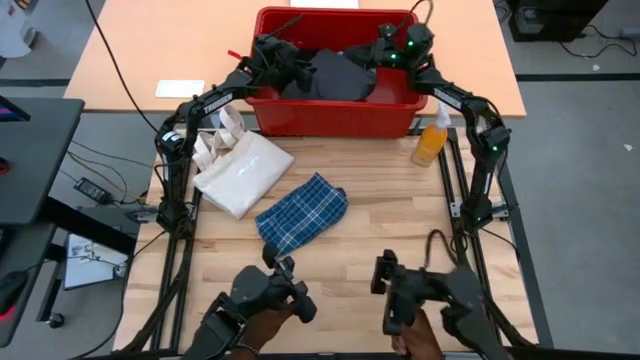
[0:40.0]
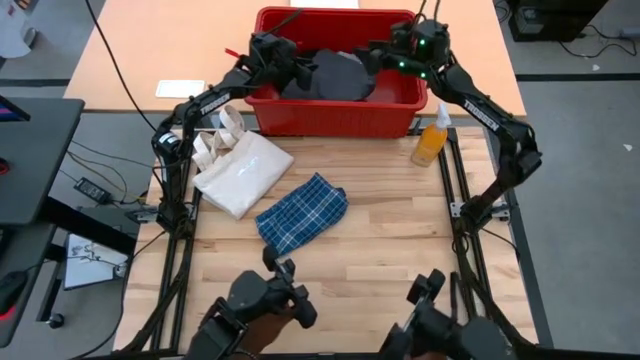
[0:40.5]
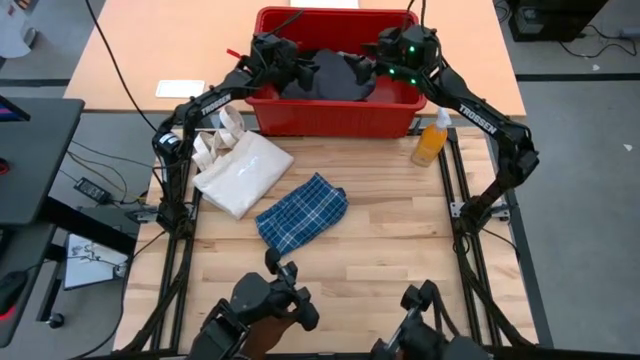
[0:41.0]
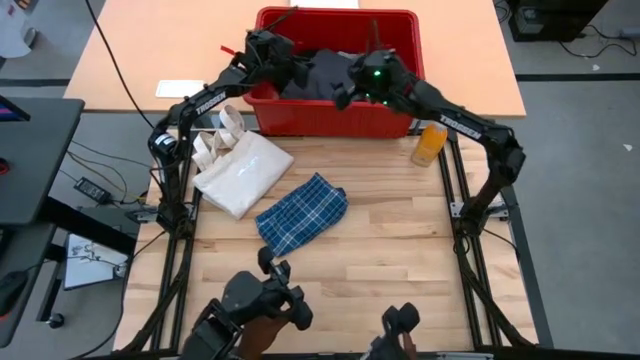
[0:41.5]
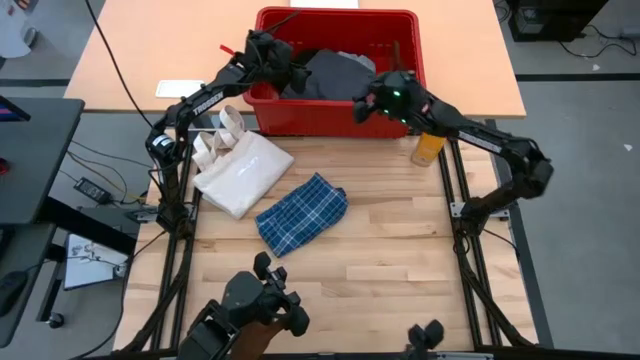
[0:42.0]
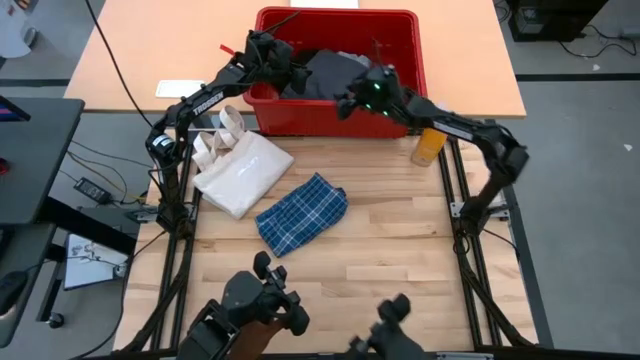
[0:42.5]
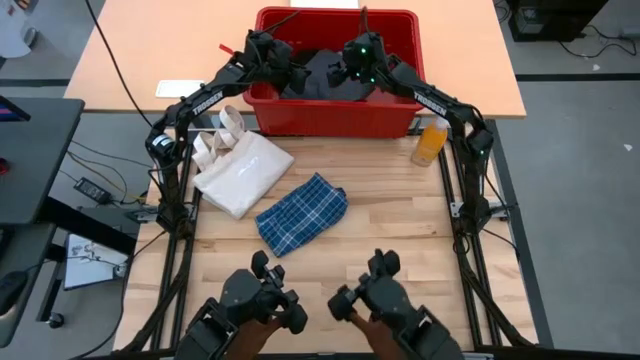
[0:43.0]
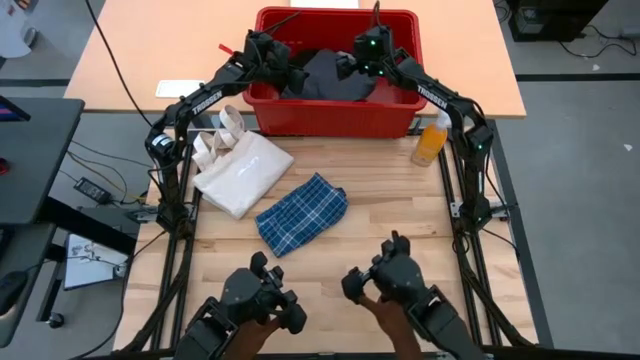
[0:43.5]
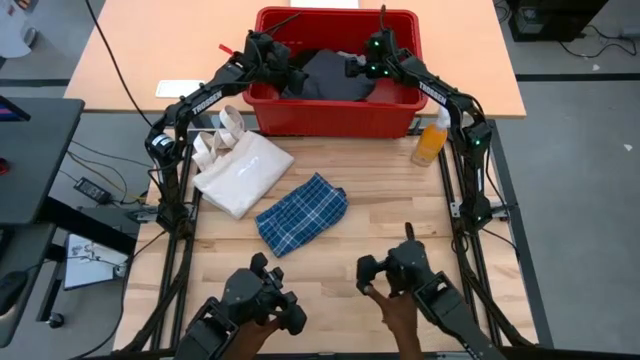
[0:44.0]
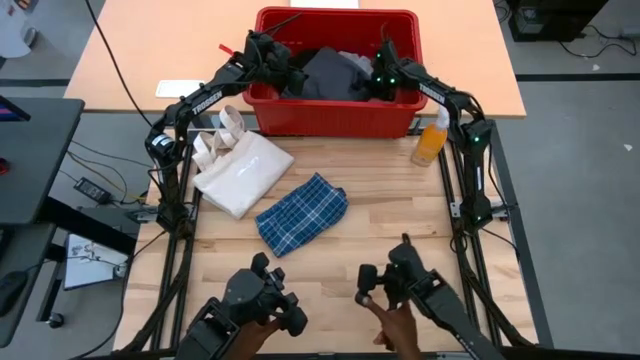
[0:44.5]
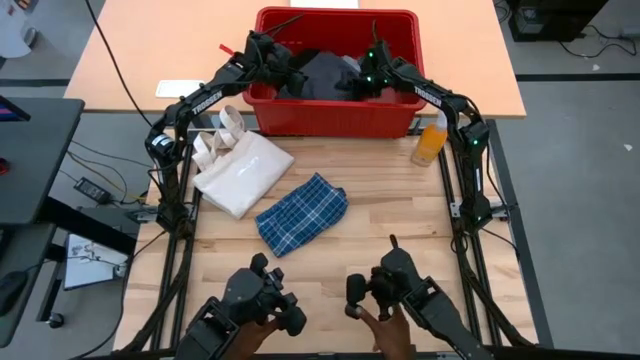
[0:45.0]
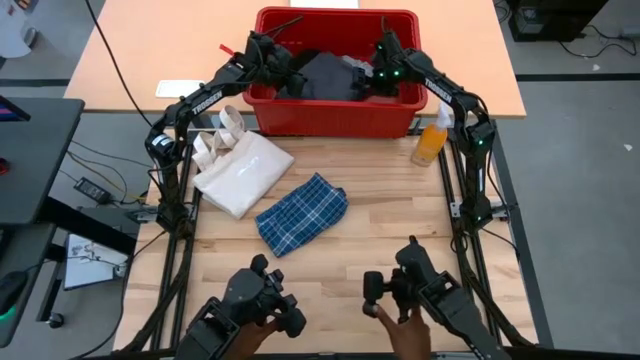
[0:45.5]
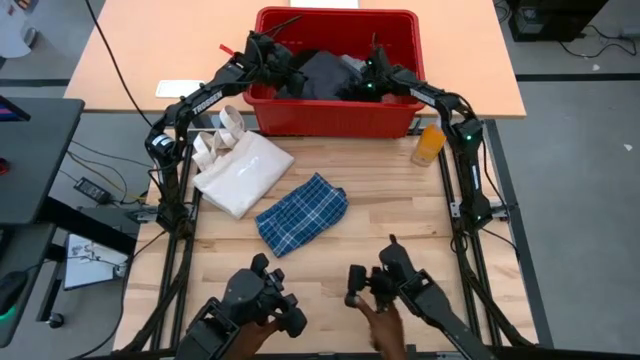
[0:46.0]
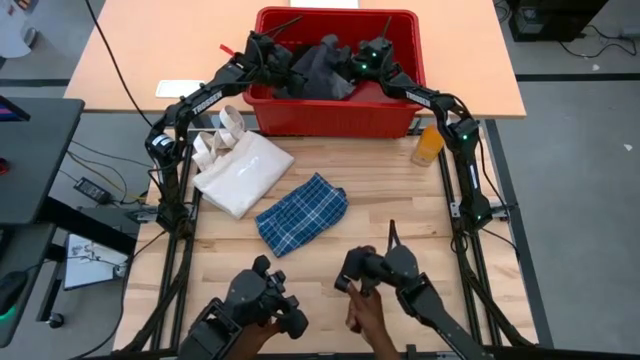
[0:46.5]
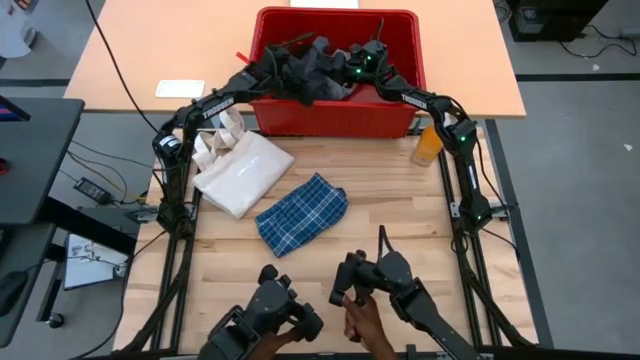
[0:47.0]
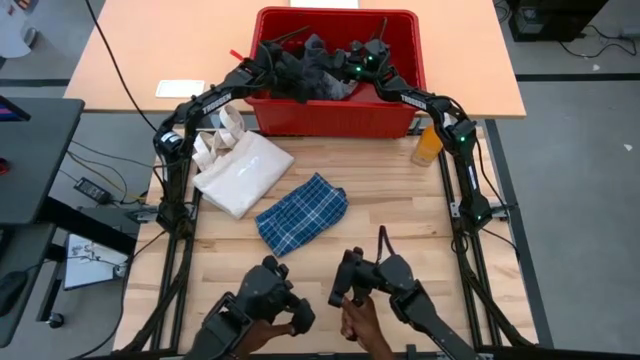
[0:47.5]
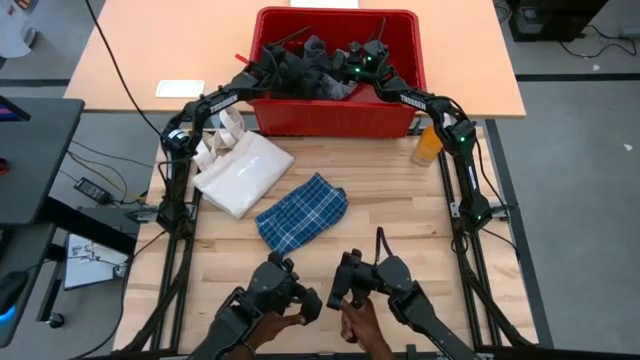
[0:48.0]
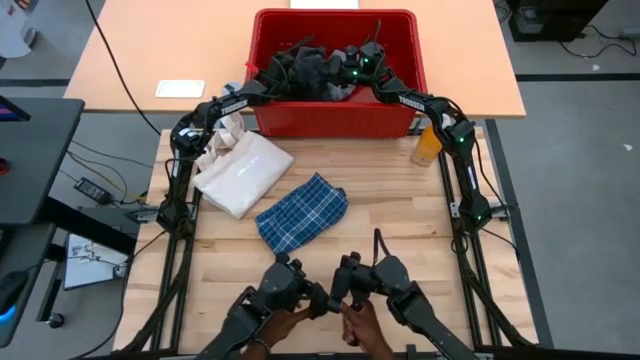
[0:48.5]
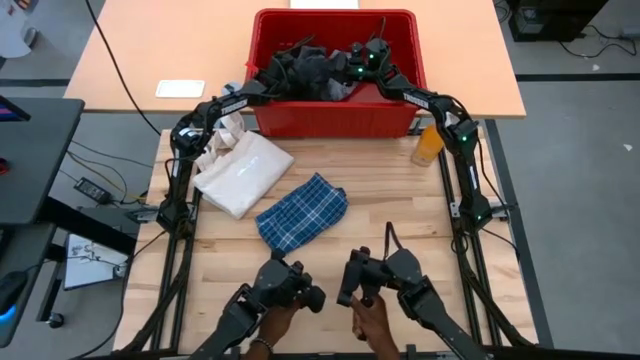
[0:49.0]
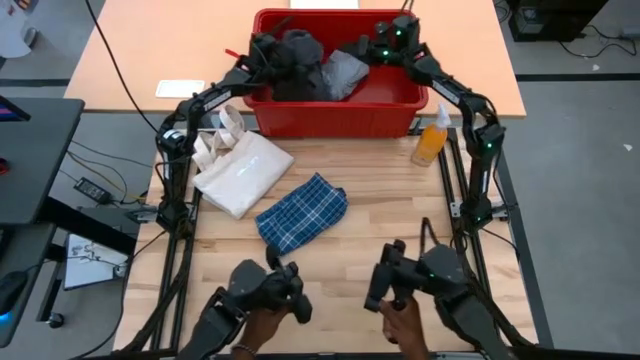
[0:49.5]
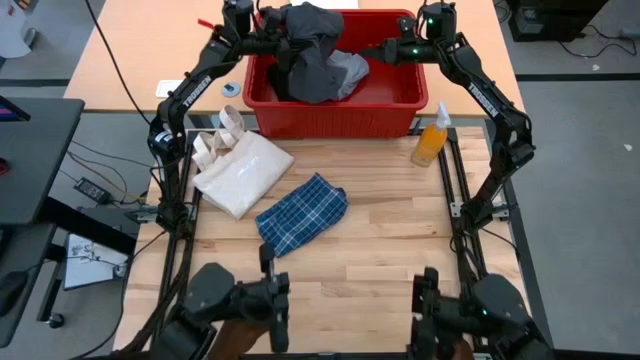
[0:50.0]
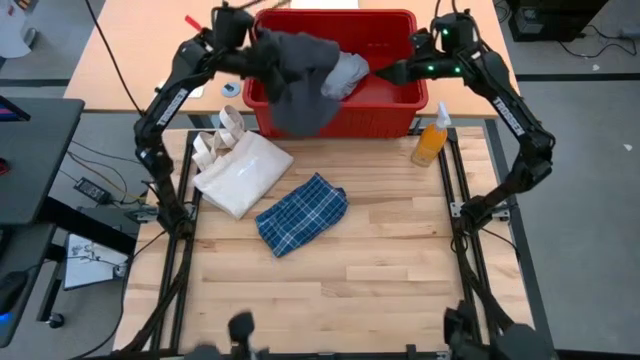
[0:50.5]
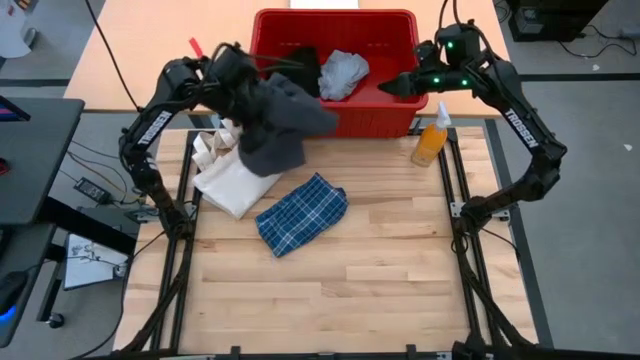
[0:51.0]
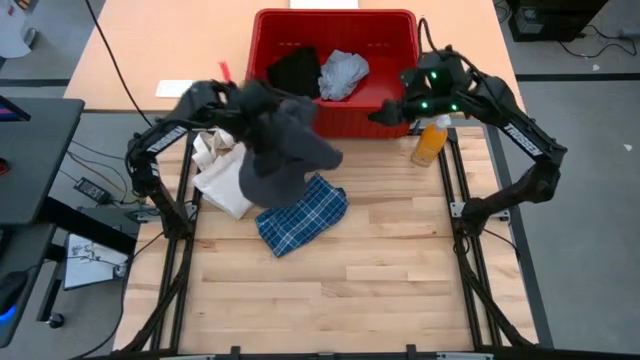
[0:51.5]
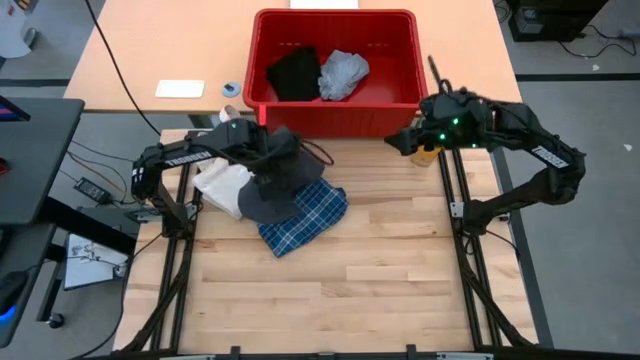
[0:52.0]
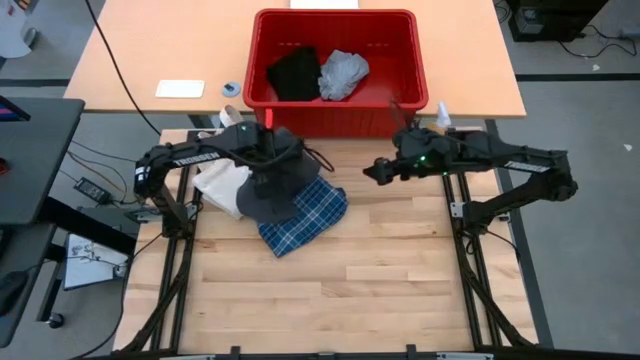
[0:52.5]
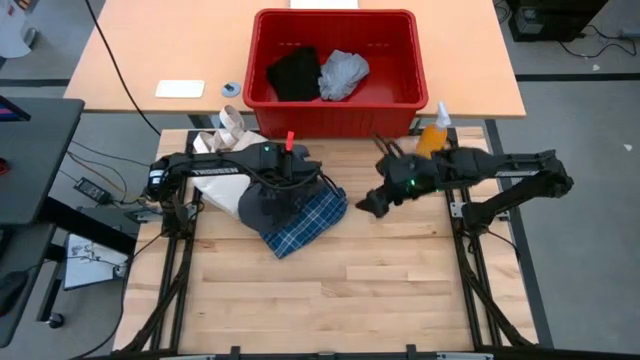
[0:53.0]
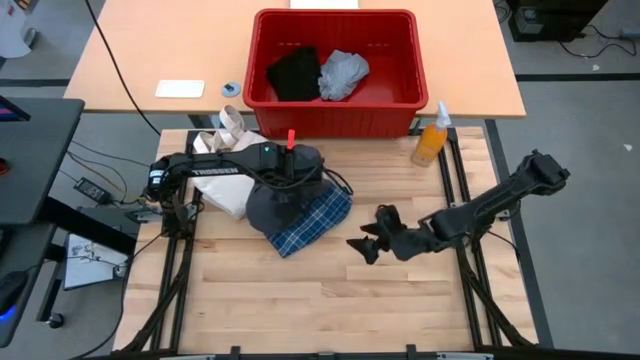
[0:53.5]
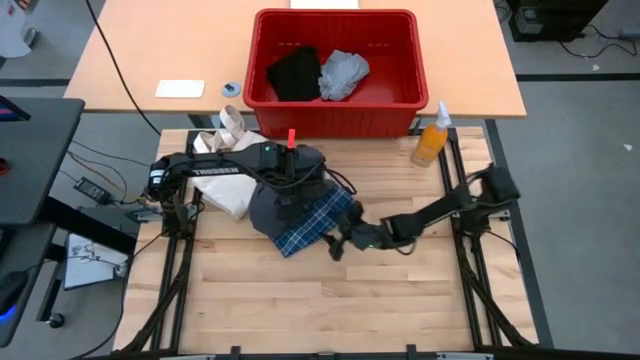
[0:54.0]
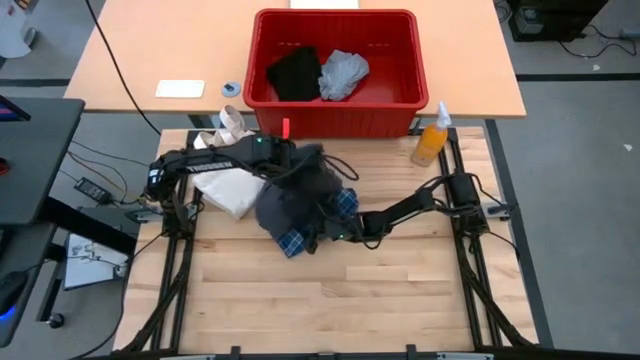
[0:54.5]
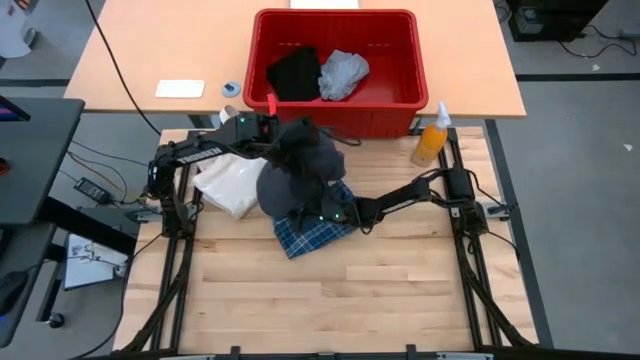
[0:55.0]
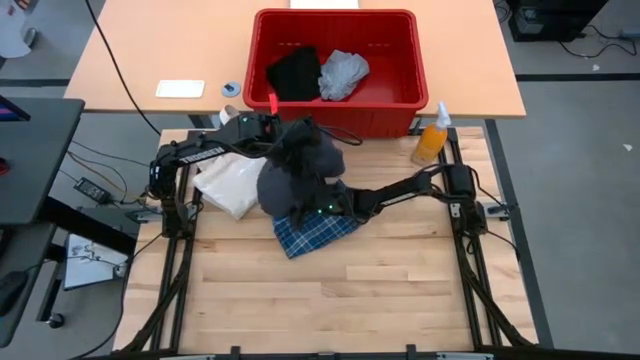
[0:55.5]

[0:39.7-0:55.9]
Task: Fold Laundry from Bin
Remove the dark gray shorts from the red organizer bin

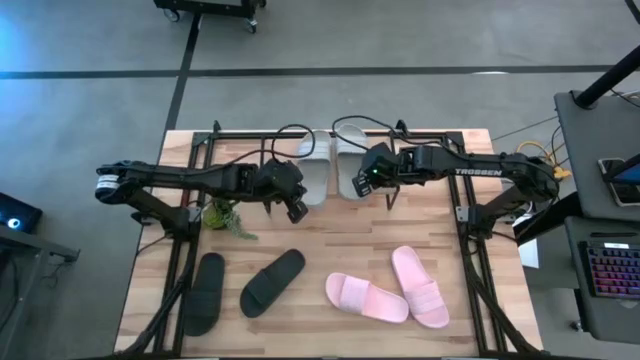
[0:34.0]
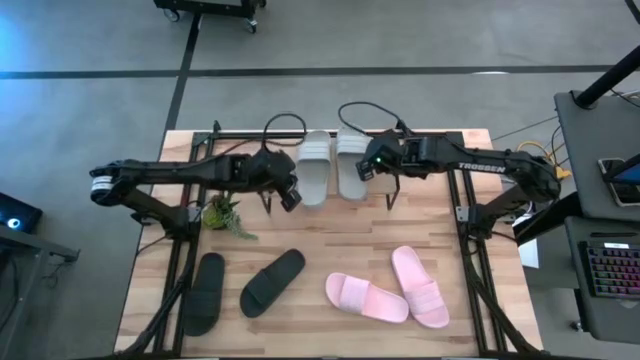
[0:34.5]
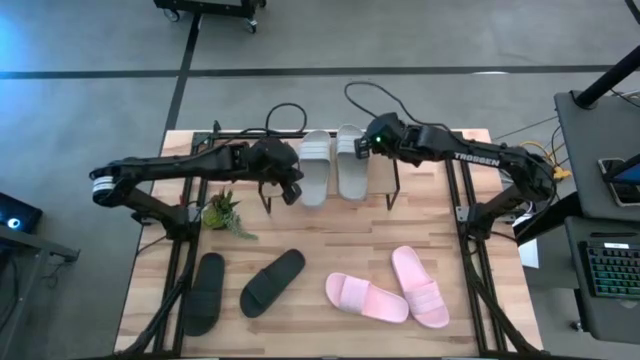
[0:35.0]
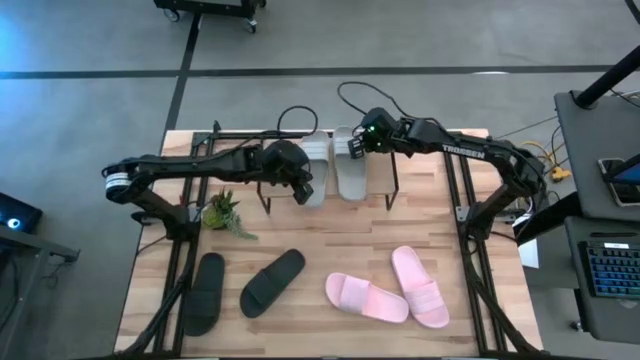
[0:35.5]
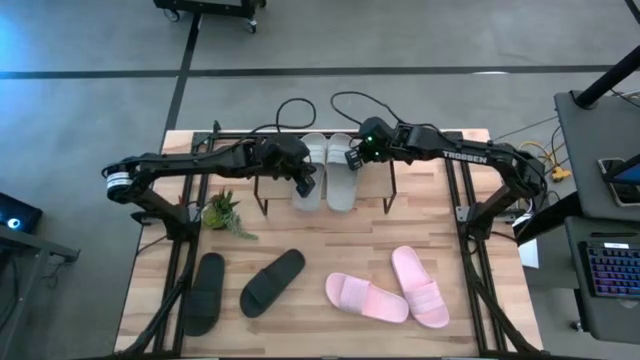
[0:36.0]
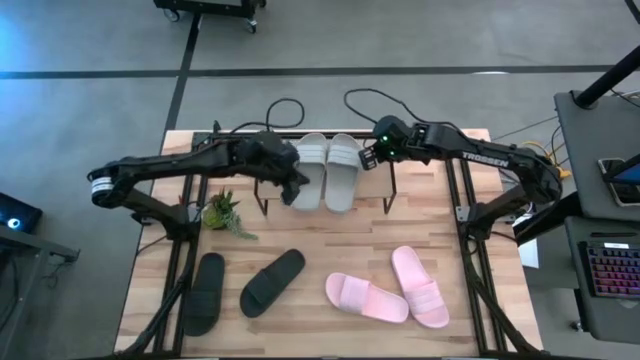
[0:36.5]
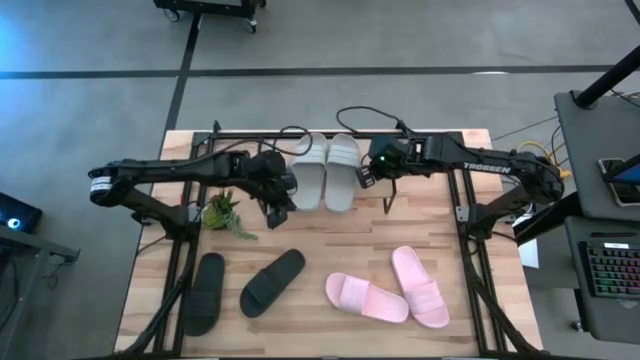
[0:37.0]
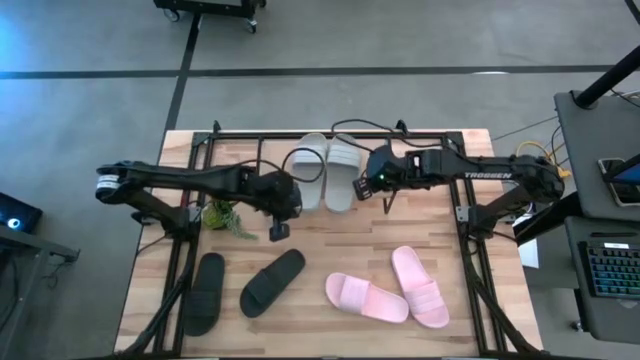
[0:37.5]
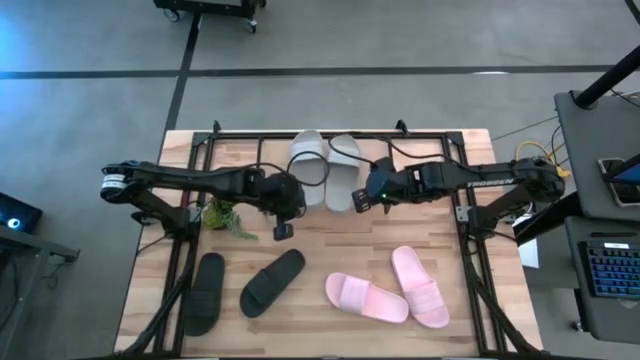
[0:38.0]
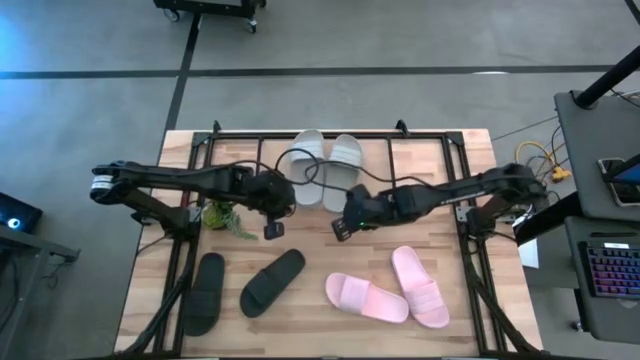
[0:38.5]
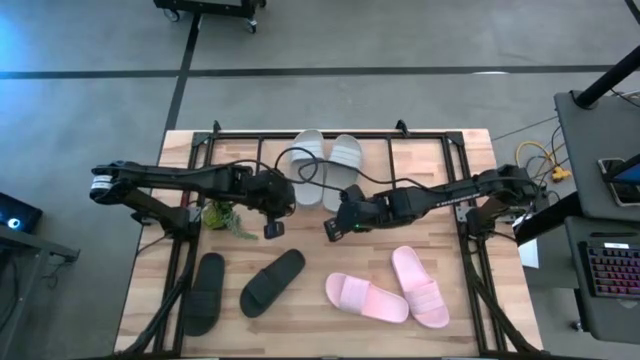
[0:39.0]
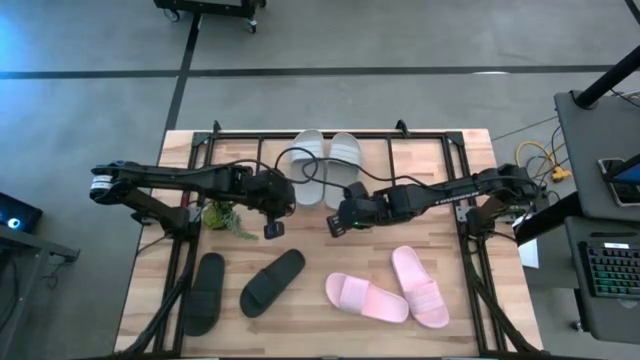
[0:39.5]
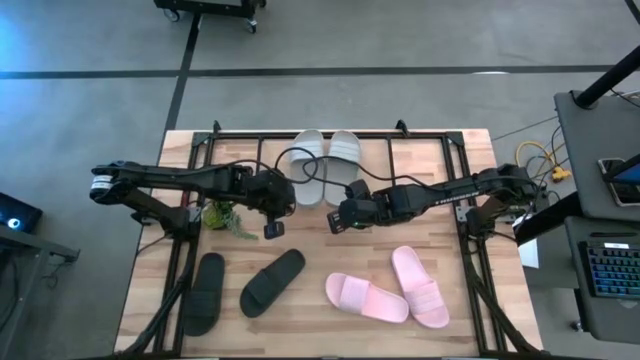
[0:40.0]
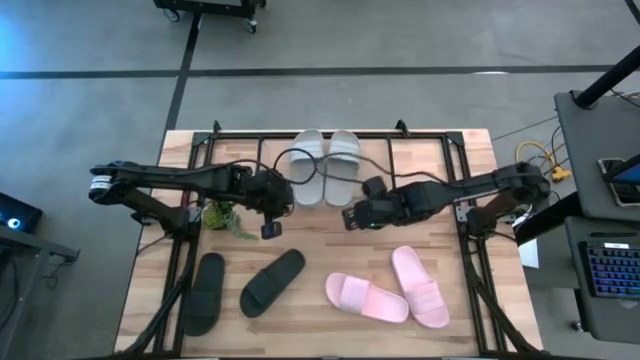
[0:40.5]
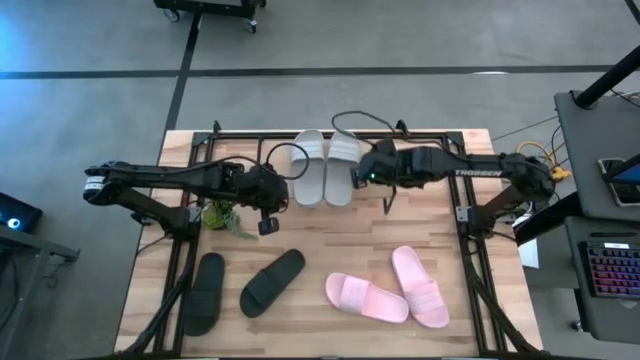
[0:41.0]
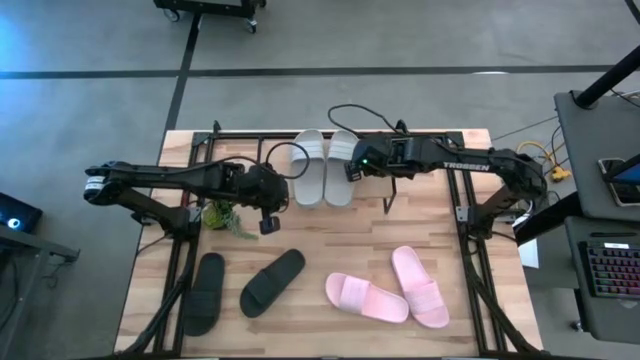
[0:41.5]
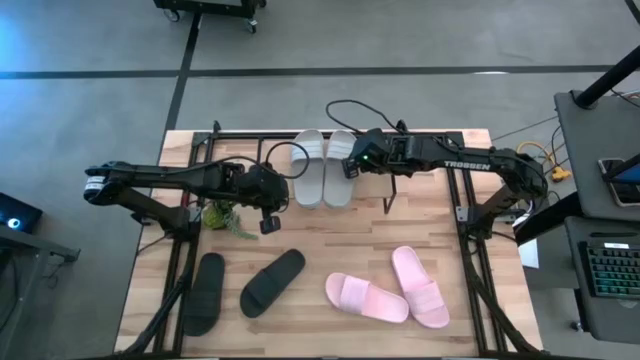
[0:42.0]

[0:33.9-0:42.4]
Task: Pick and place slides into the shelf
Adjust the gray slide on the shelf
